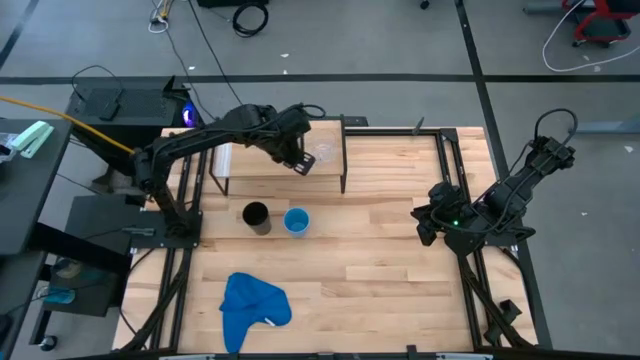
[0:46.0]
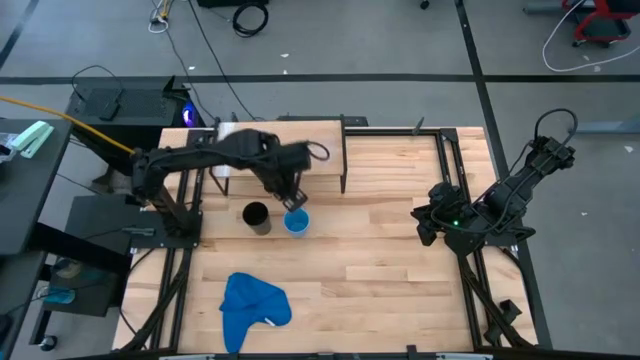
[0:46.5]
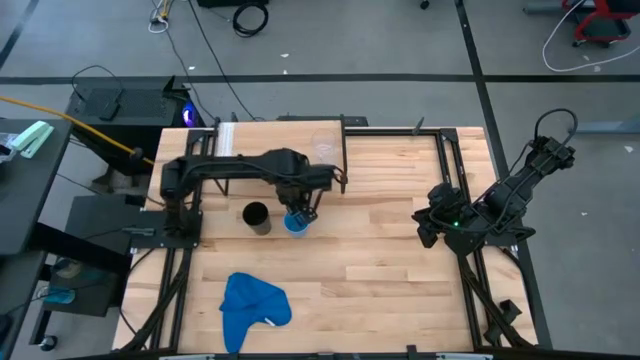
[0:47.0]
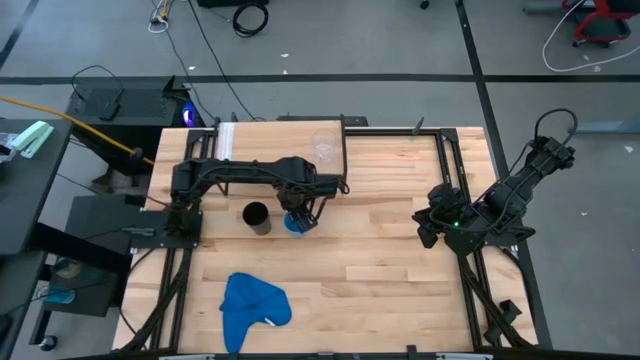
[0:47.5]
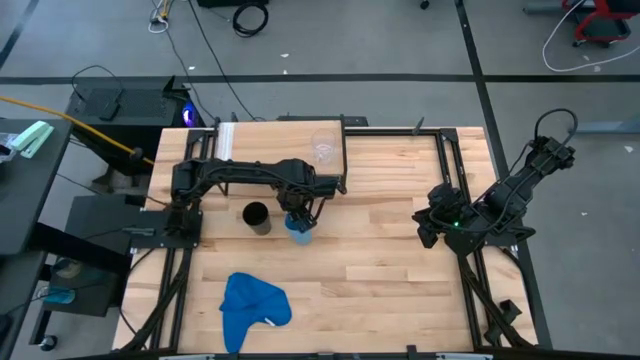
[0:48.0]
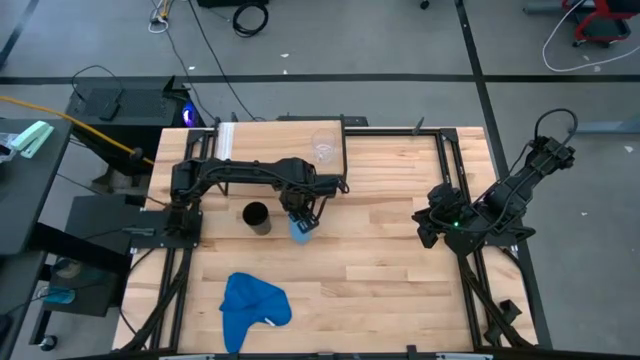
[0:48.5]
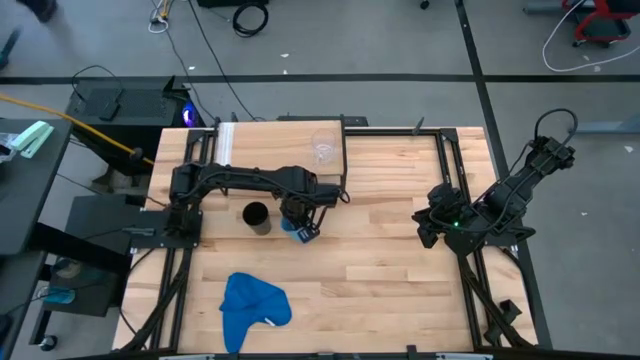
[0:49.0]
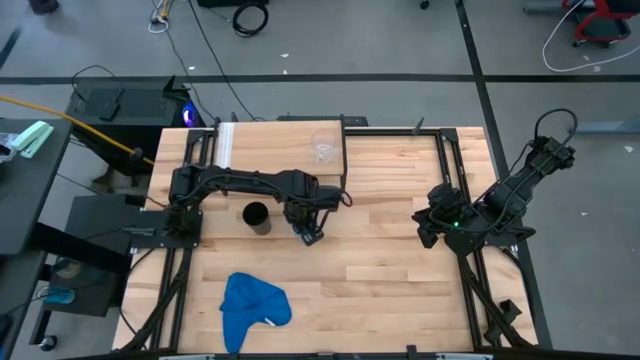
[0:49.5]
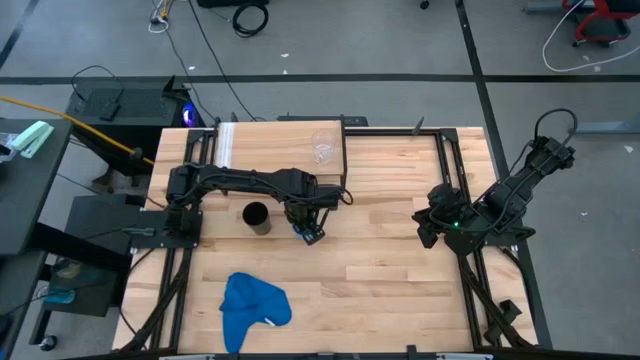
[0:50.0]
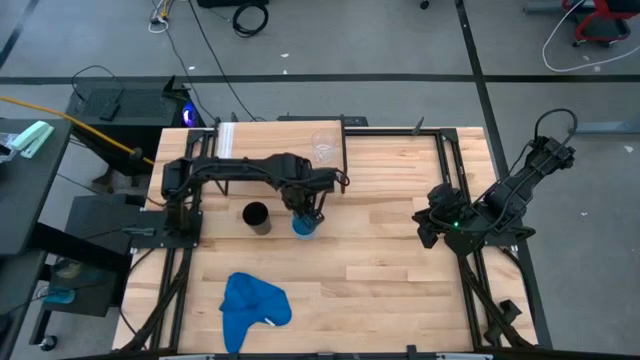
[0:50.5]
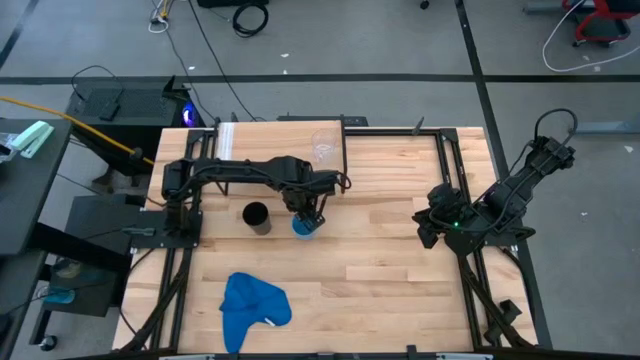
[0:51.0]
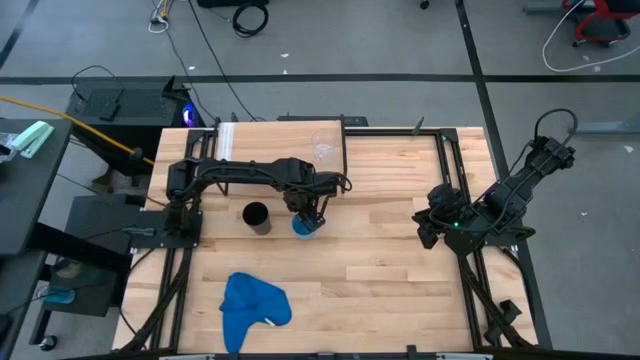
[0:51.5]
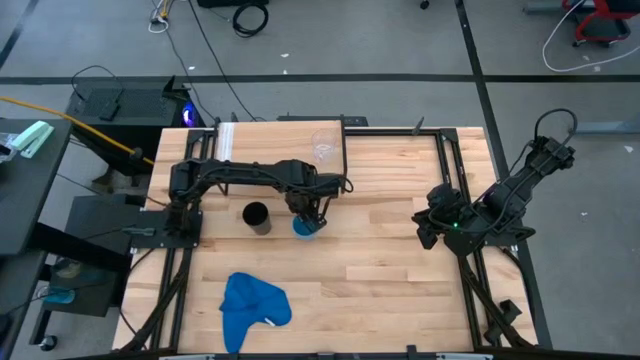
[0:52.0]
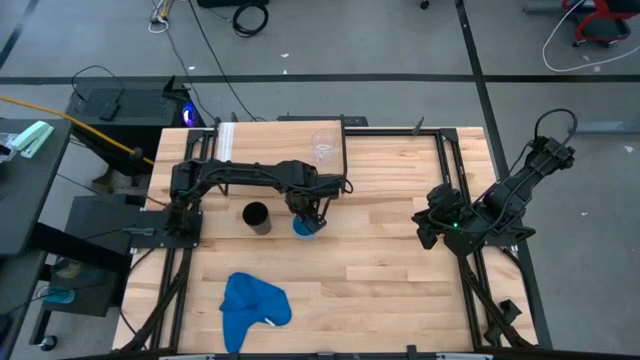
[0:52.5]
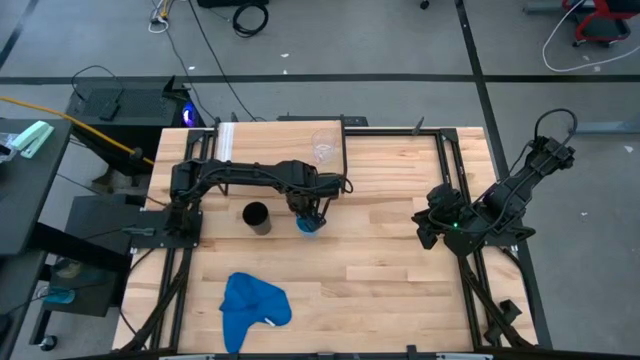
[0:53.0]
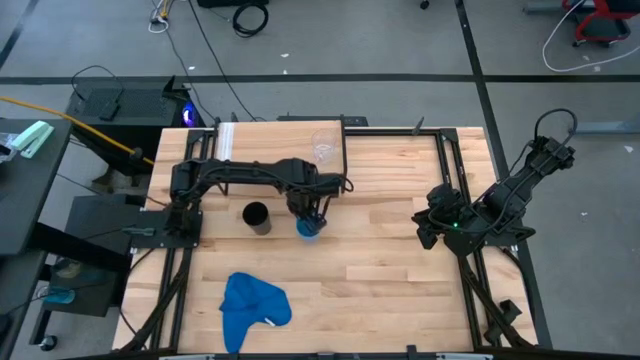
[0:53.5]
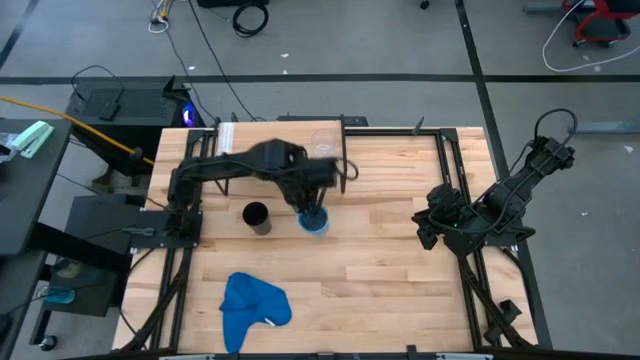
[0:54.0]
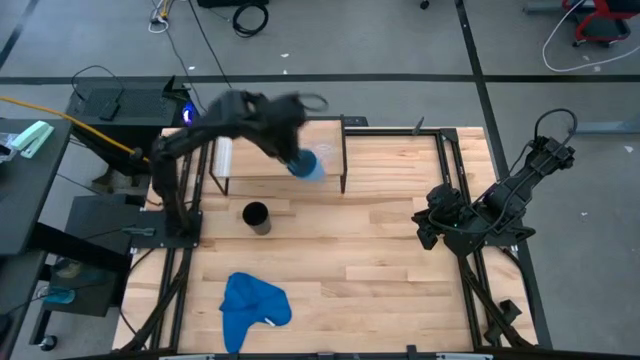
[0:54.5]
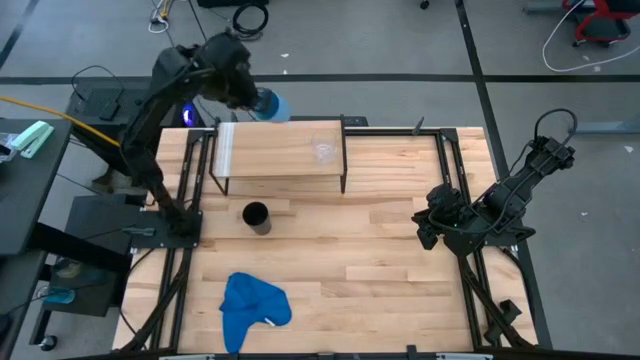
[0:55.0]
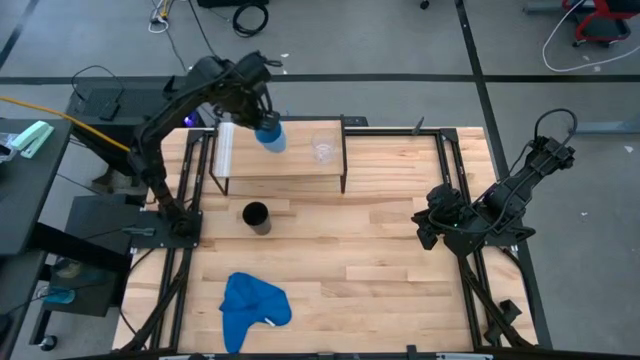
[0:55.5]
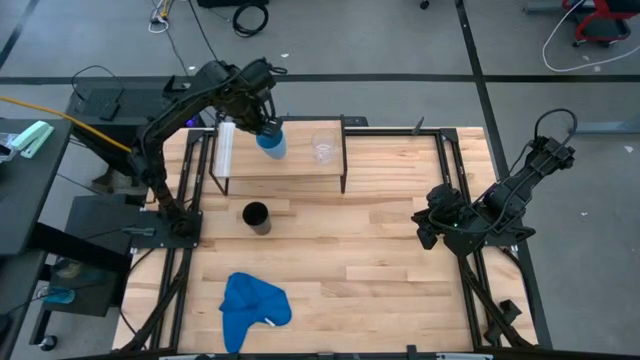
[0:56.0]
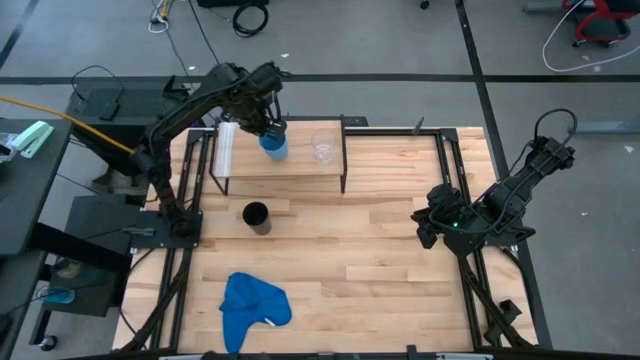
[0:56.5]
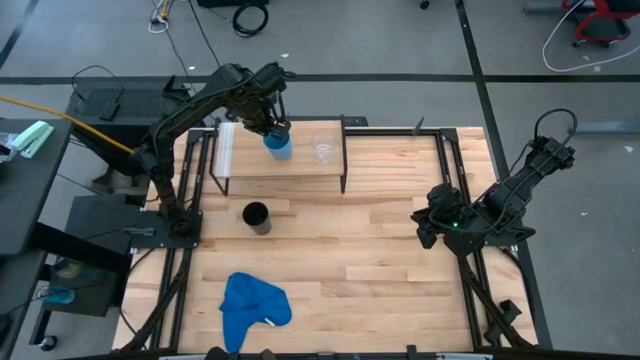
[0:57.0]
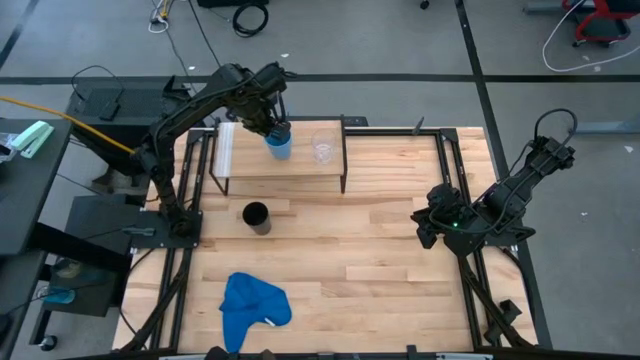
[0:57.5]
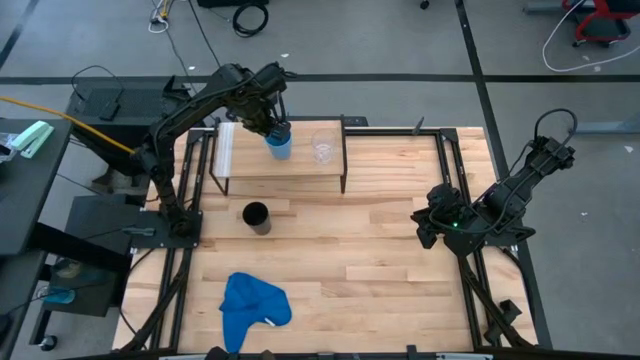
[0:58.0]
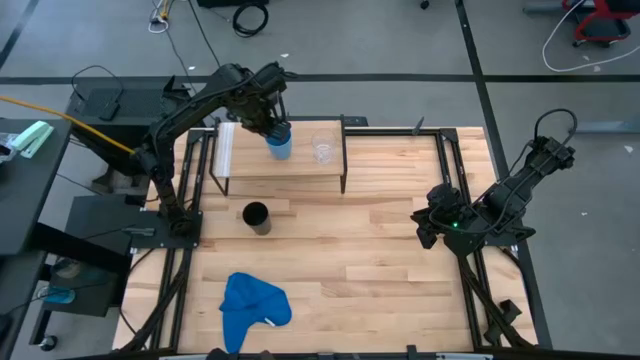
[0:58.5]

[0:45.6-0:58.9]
Task: Stack small to large cups/mugs on shelf
Put the blue cup on the shelf

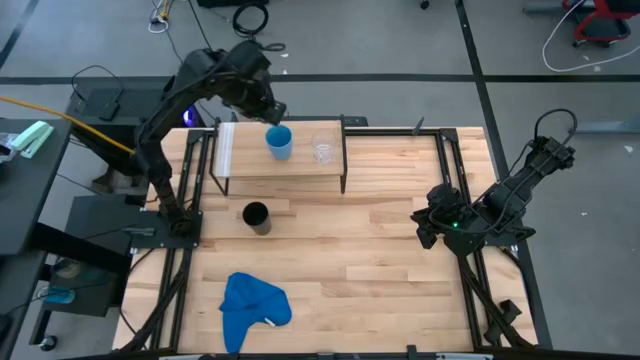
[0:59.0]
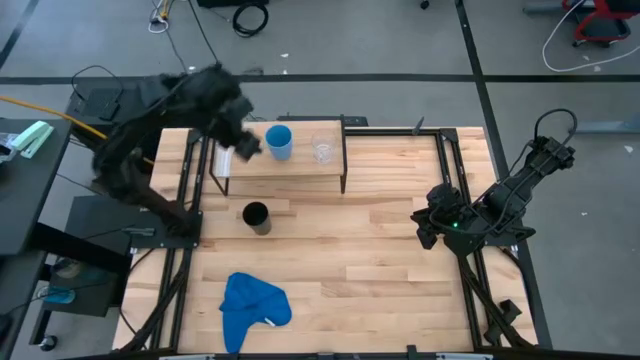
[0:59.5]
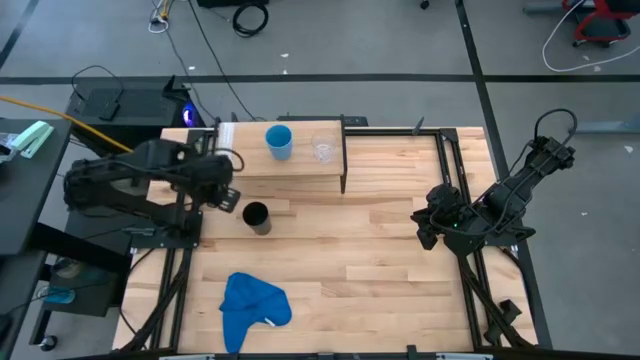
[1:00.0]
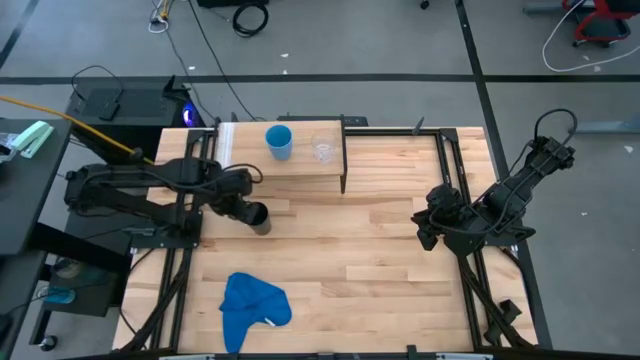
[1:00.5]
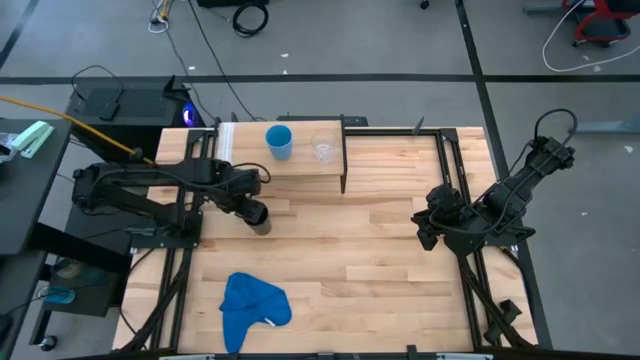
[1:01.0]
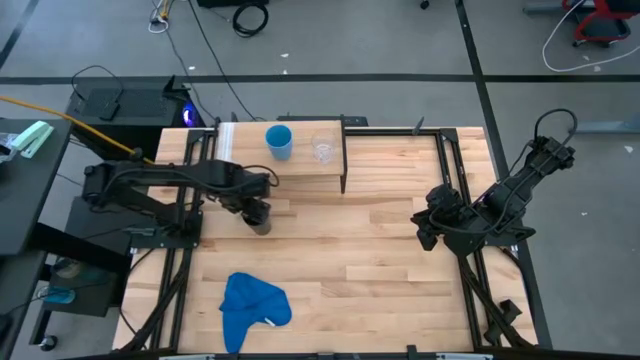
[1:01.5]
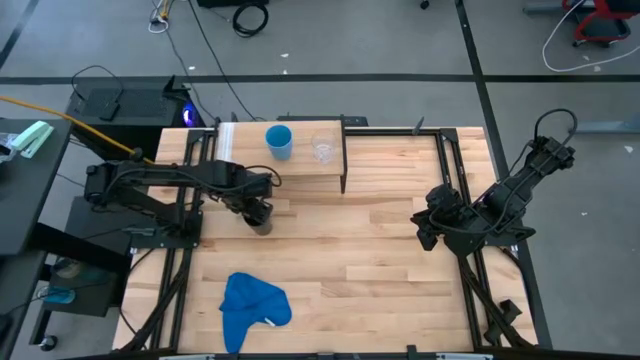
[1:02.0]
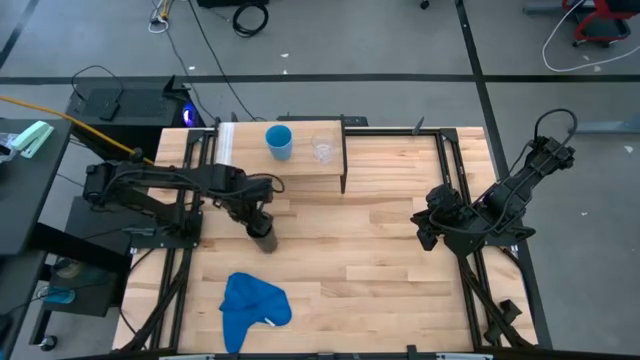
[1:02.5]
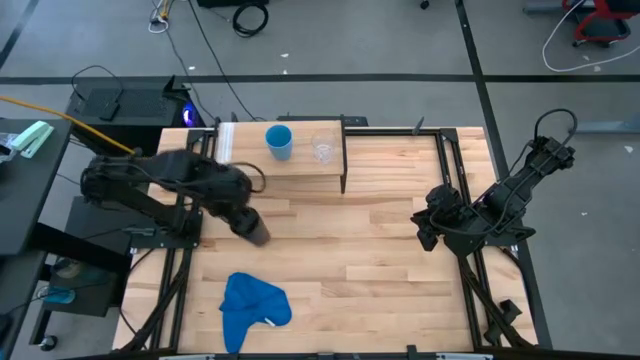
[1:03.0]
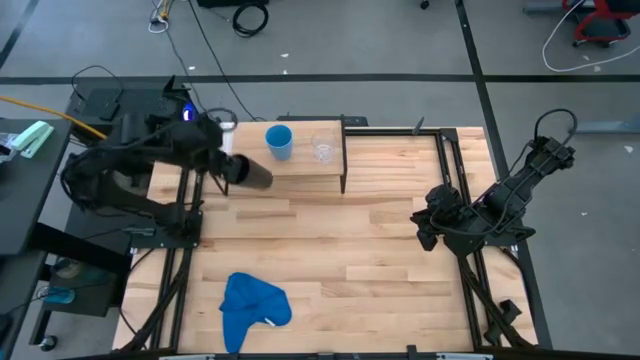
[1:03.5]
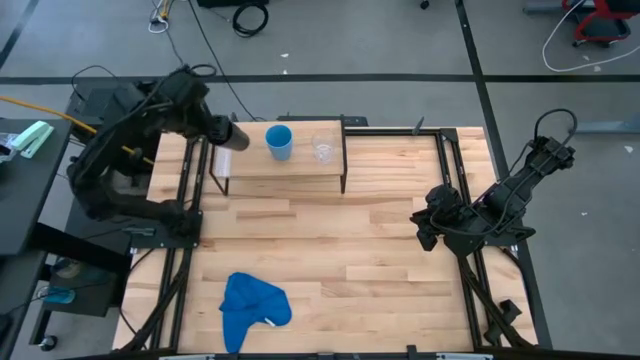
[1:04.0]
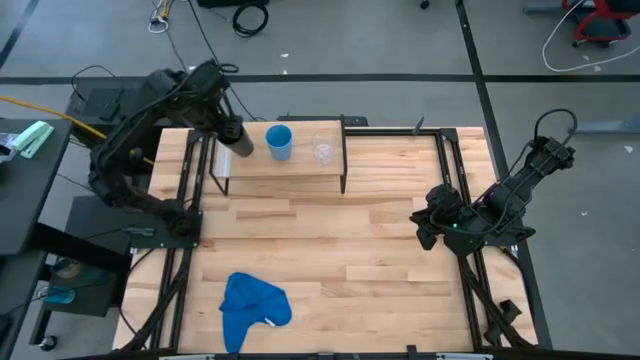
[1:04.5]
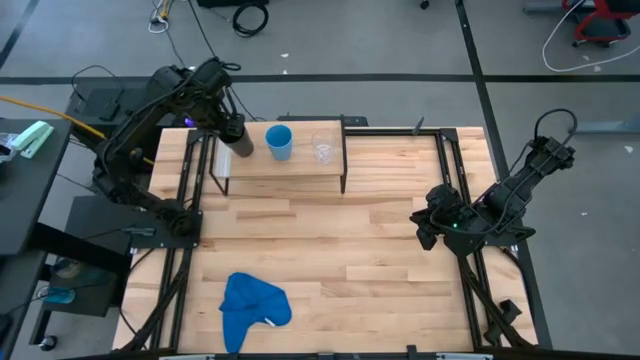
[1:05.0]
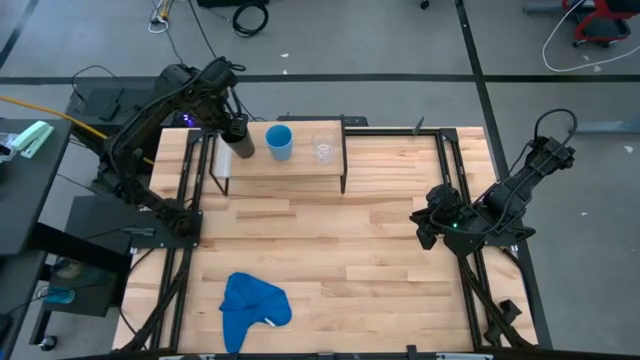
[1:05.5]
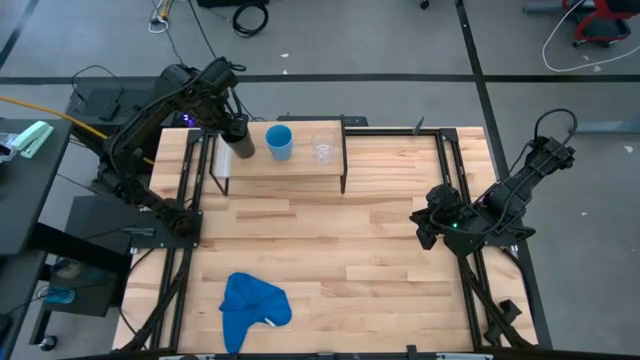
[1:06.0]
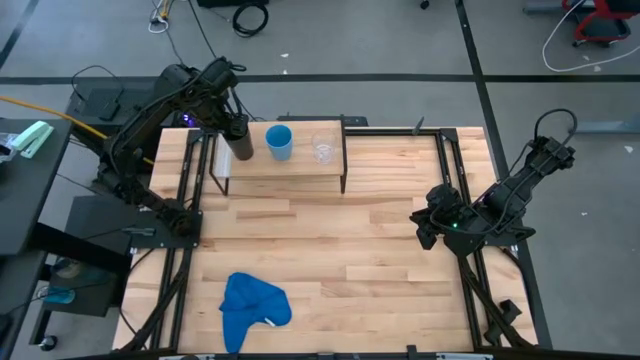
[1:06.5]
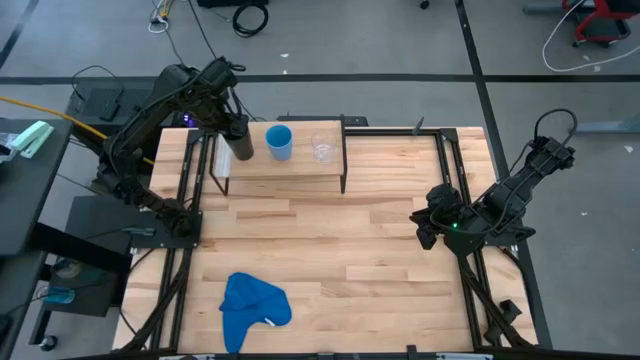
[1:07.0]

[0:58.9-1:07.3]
Put the black cup on the shelf
